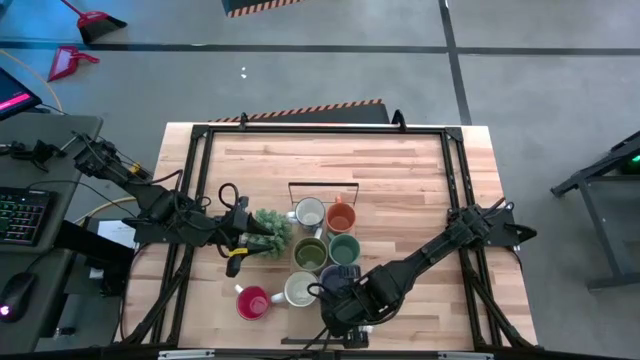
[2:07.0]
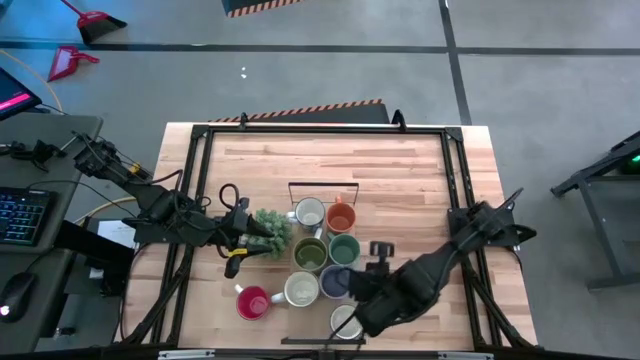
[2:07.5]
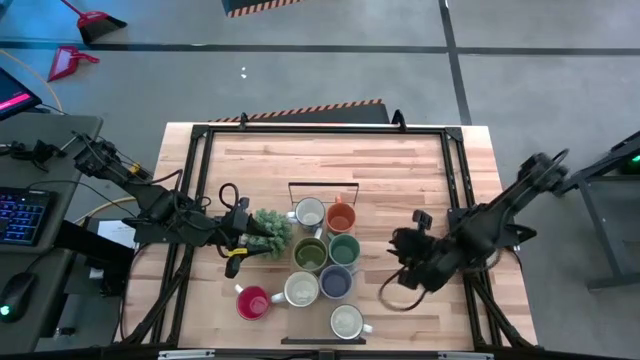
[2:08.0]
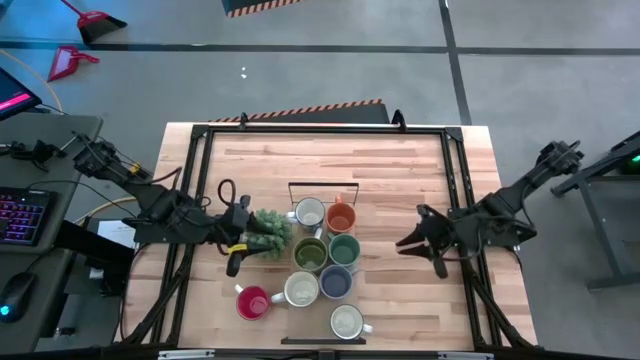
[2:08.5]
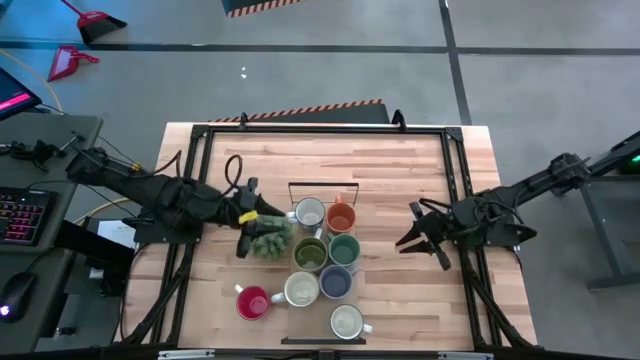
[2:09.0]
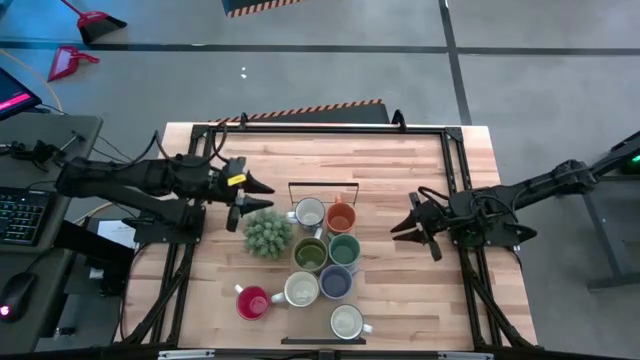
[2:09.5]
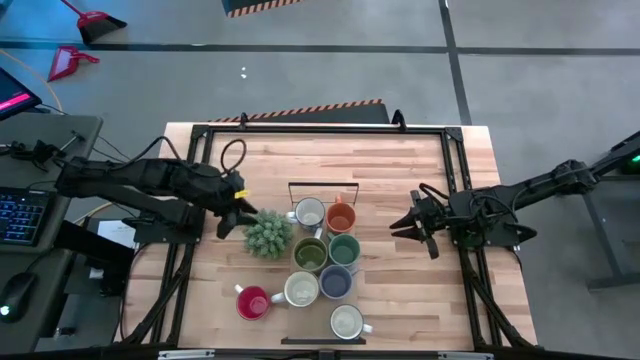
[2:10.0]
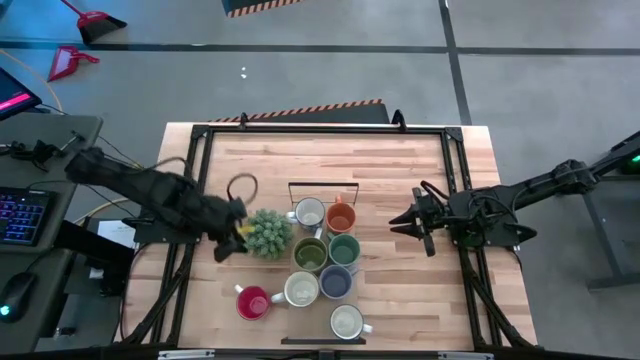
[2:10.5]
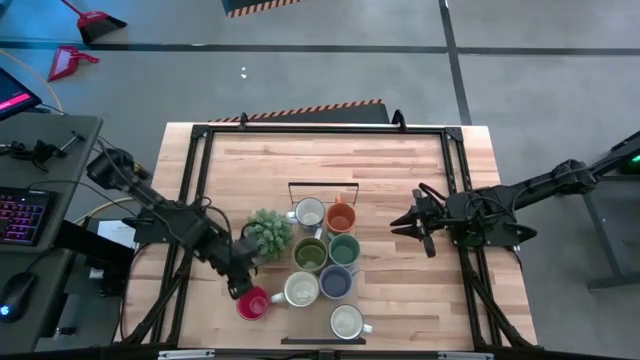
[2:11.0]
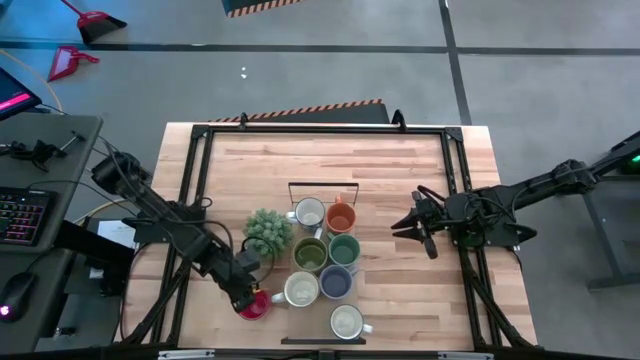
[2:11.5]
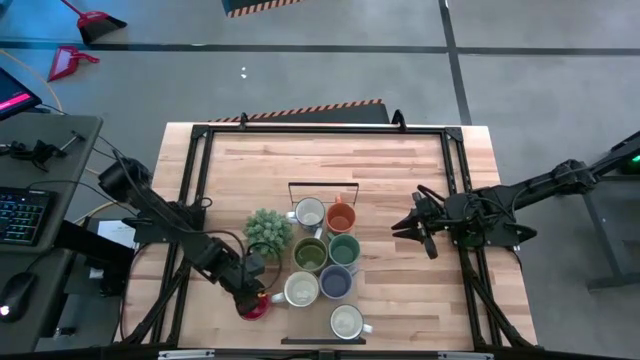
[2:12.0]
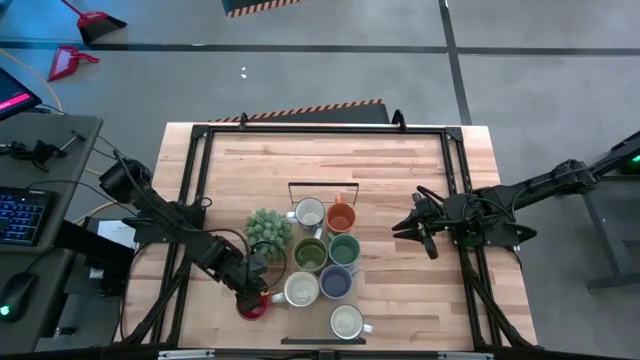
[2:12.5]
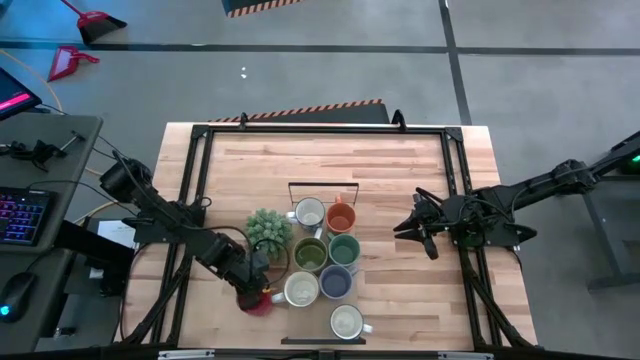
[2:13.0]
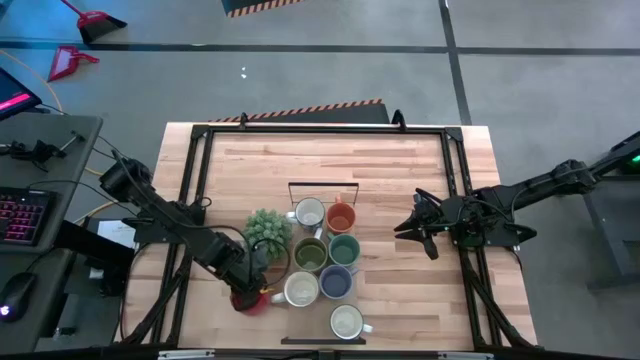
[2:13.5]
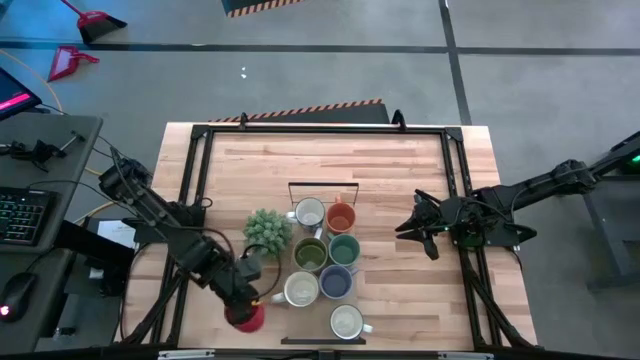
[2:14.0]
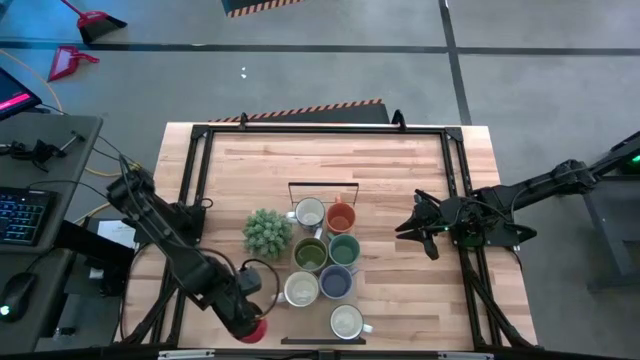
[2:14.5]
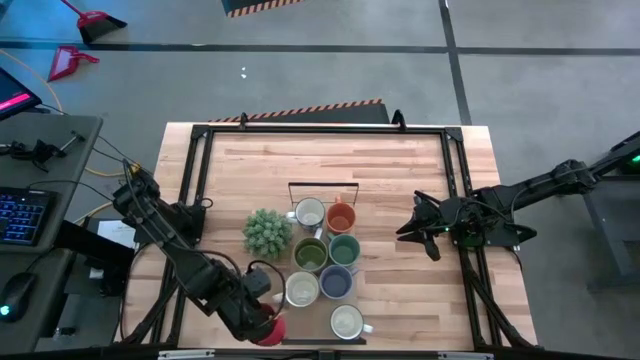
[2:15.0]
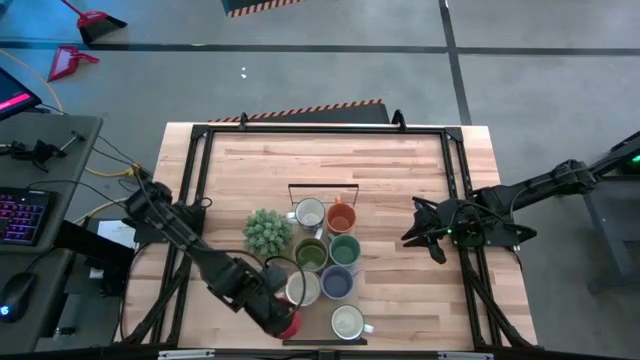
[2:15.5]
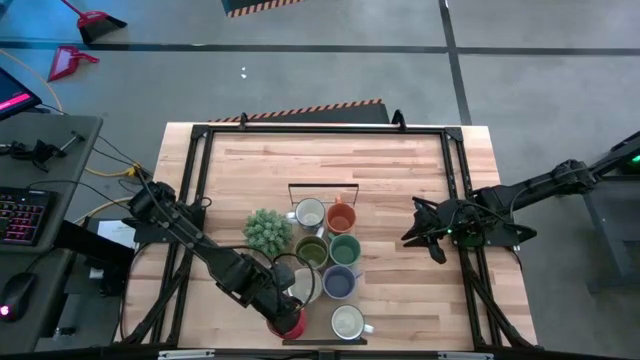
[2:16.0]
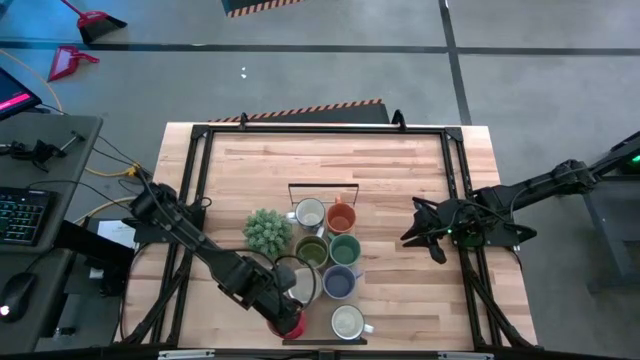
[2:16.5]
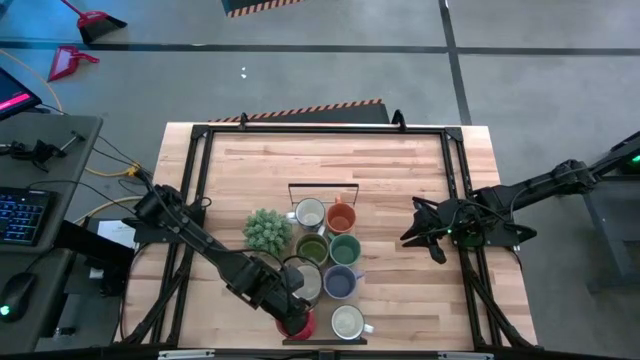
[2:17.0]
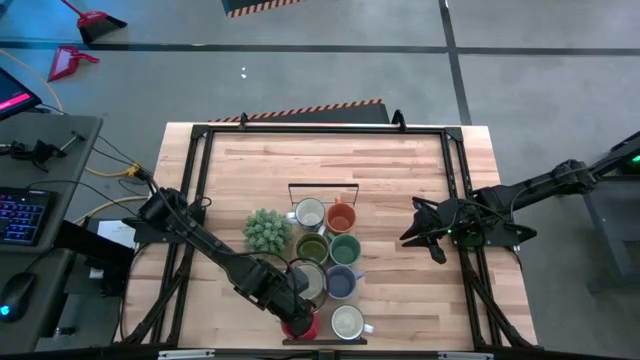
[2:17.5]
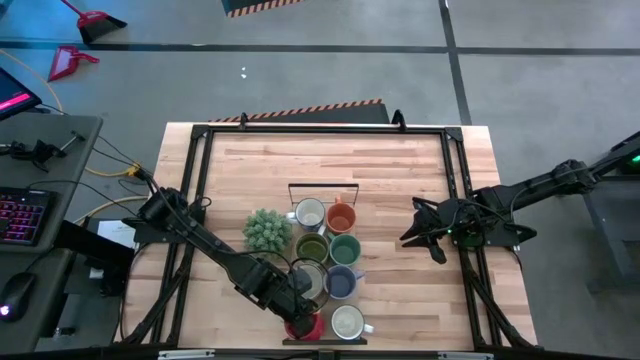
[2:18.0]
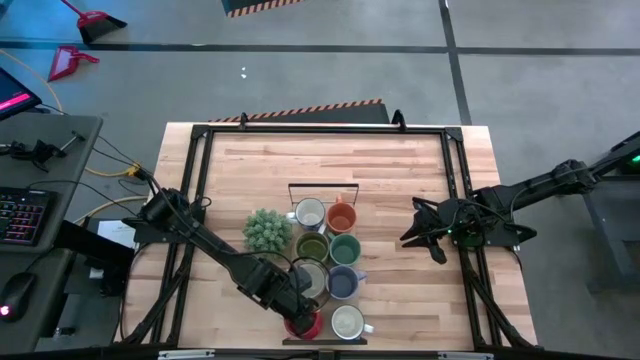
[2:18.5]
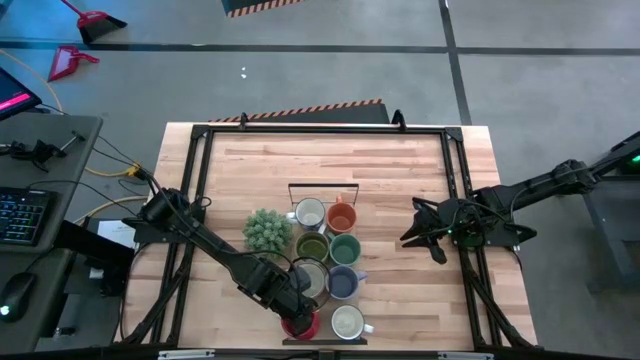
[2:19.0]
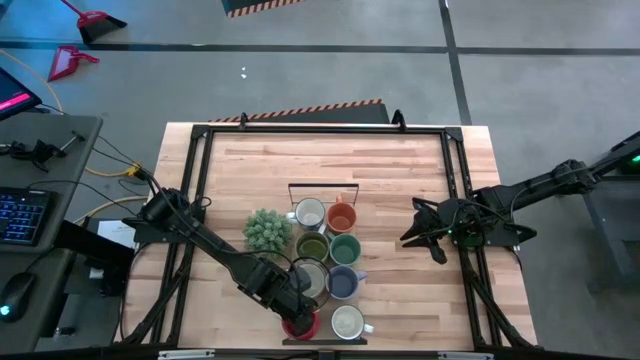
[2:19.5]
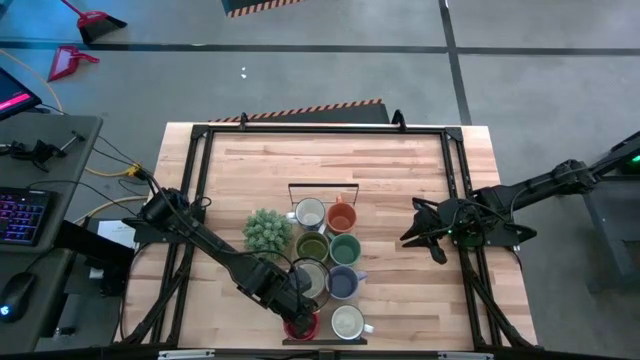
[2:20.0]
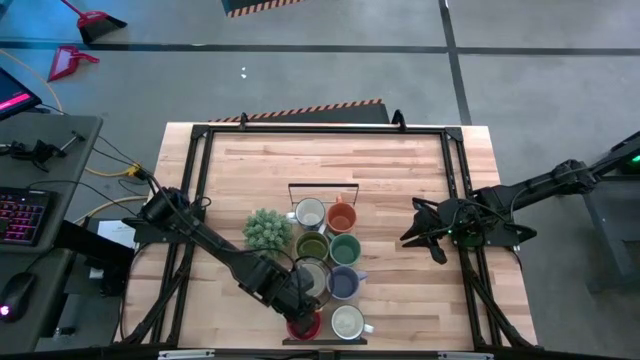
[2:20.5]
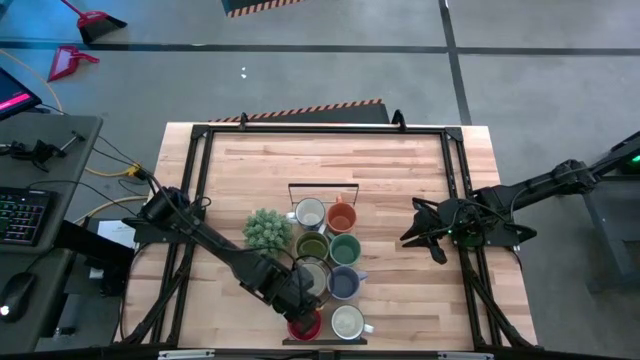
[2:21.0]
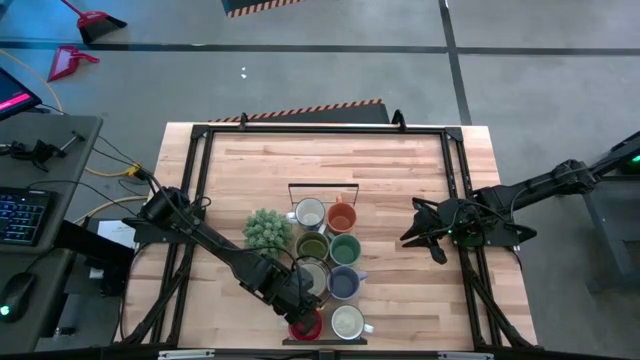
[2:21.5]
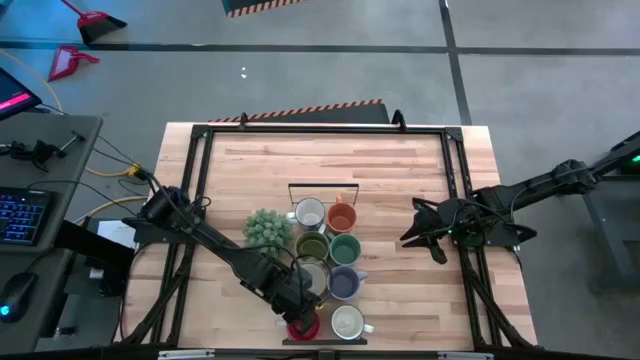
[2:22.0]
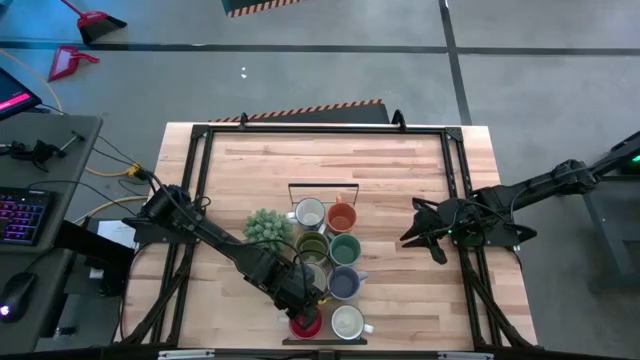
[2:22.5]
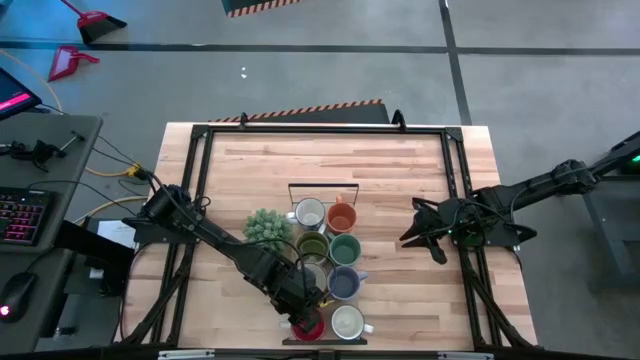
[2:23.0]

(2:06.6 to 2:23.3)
Task: Place coffee mugs
Put the red mug on the shelf

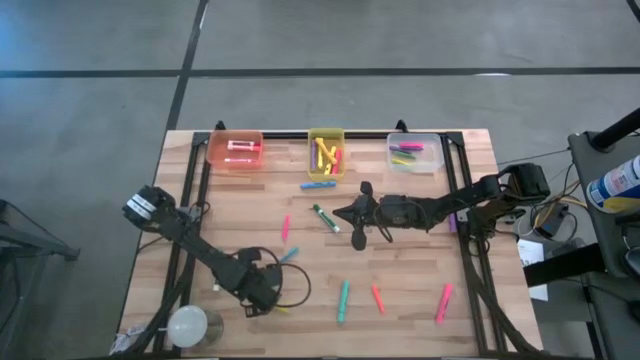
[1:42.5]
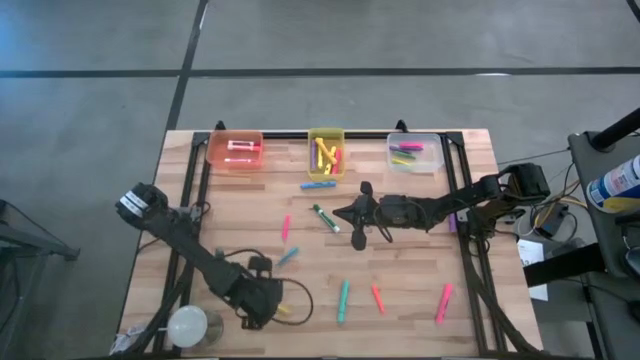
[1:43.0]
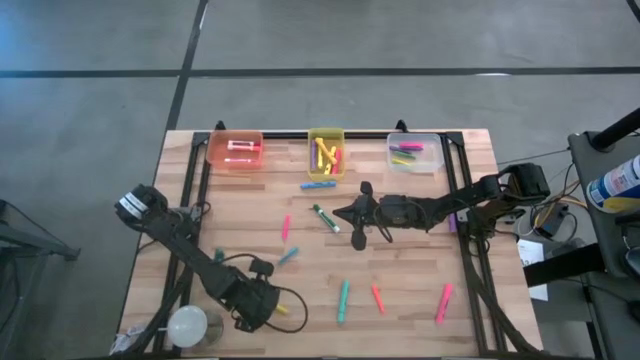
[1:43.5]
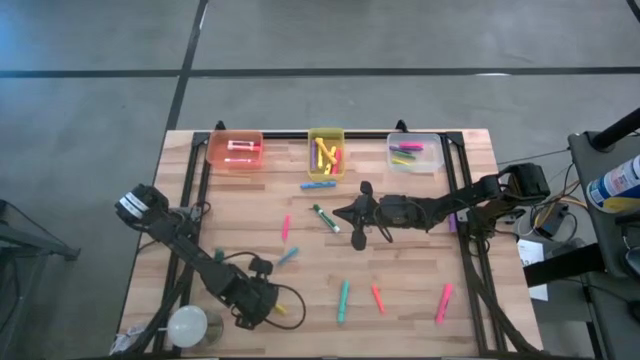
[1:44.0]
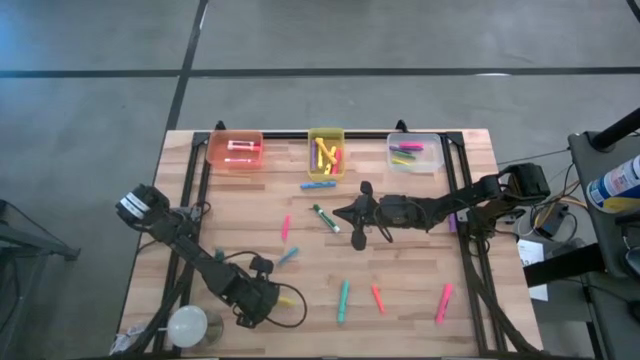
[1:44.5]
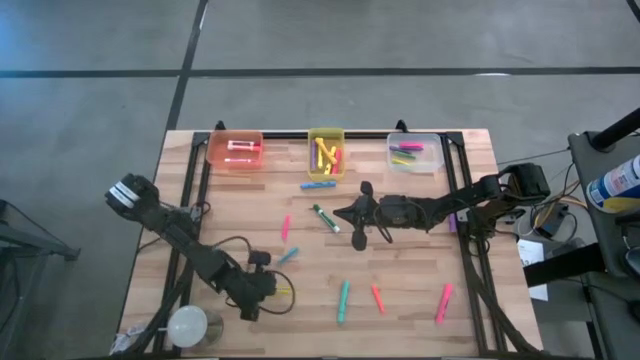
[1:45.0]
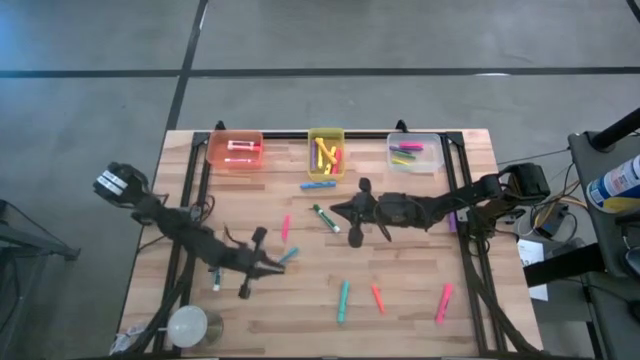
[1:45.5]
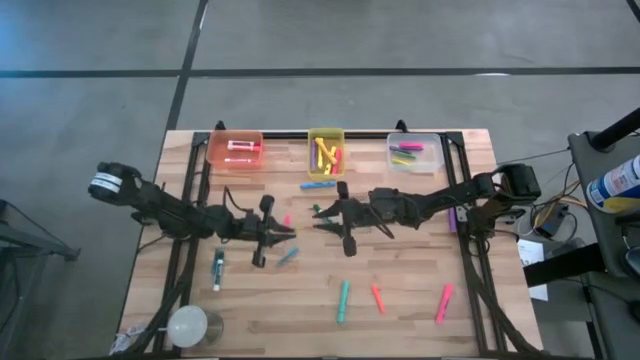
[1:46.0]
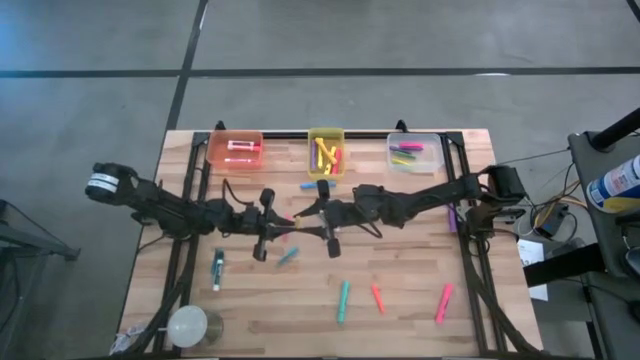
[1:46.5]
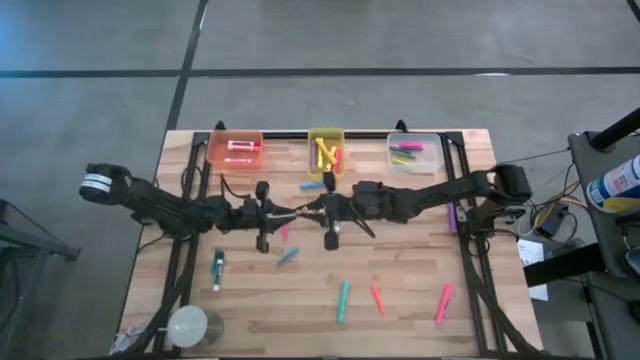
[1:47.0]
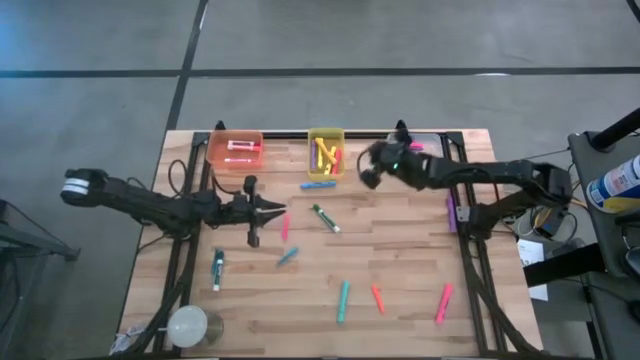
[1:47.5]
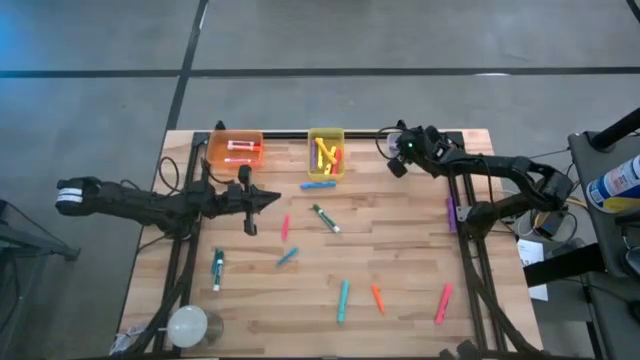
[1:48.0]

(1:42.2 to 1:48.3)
Task: Pick & Place Markers
Put the yellow pen into the transparent bin
